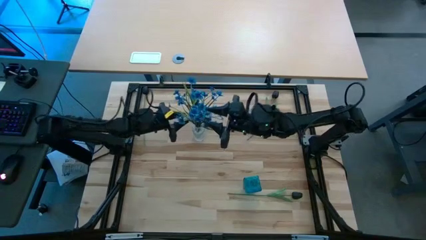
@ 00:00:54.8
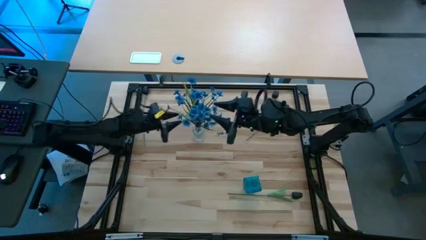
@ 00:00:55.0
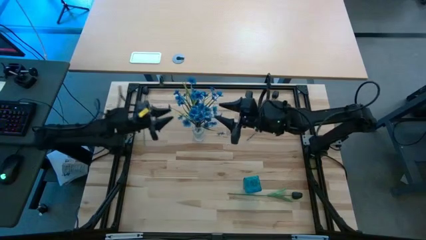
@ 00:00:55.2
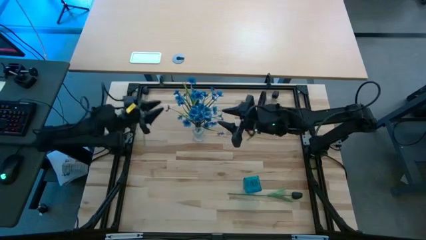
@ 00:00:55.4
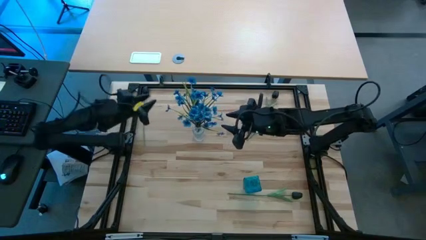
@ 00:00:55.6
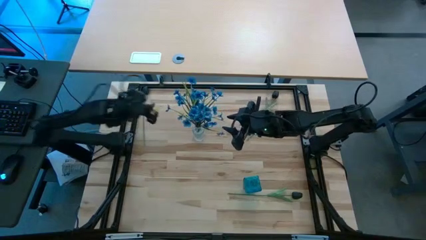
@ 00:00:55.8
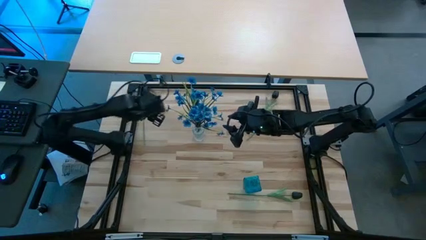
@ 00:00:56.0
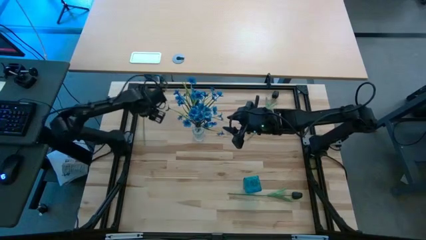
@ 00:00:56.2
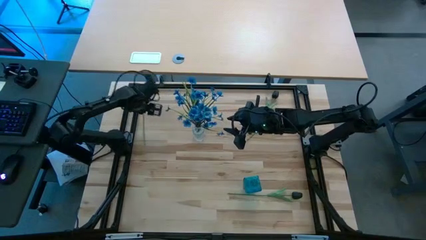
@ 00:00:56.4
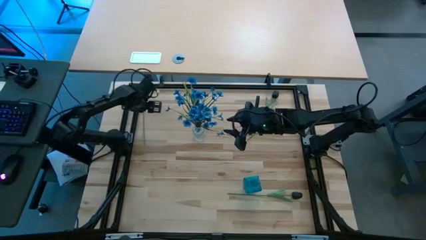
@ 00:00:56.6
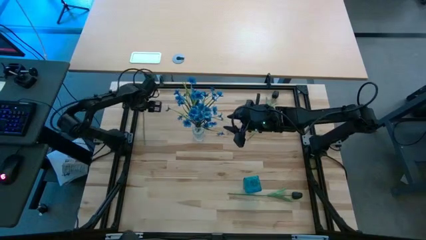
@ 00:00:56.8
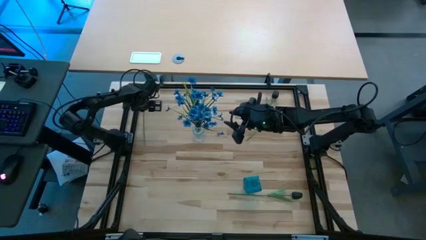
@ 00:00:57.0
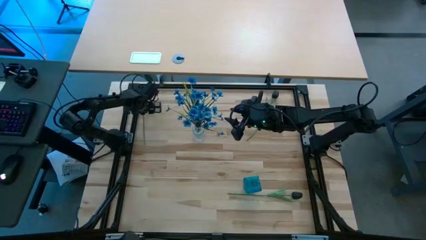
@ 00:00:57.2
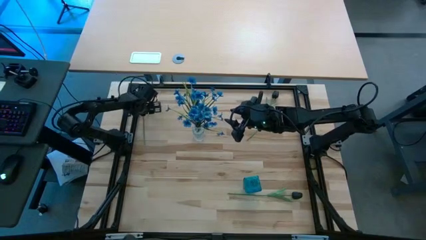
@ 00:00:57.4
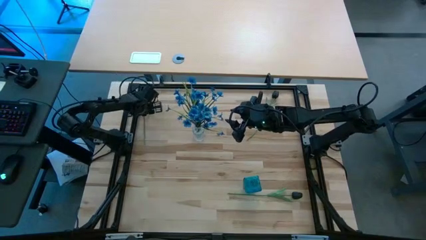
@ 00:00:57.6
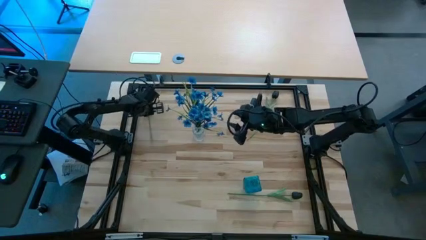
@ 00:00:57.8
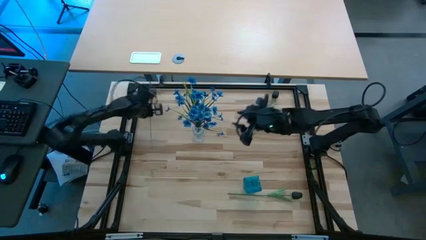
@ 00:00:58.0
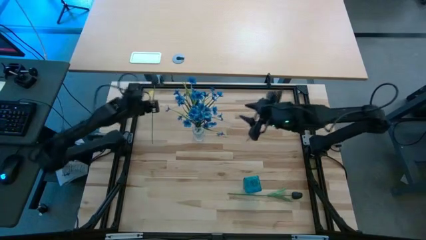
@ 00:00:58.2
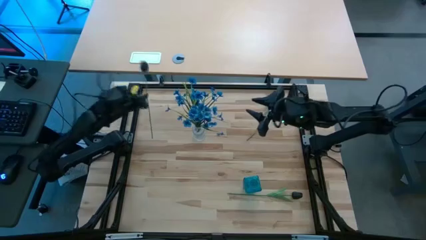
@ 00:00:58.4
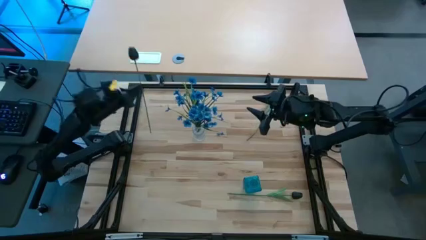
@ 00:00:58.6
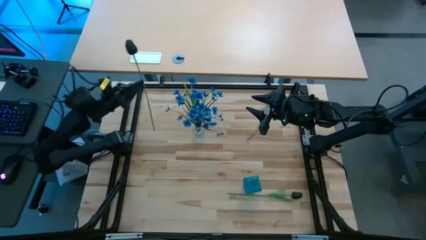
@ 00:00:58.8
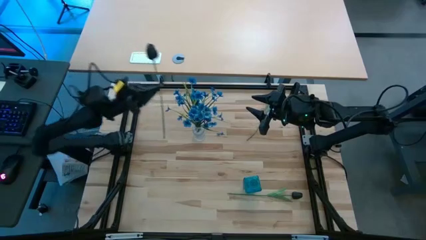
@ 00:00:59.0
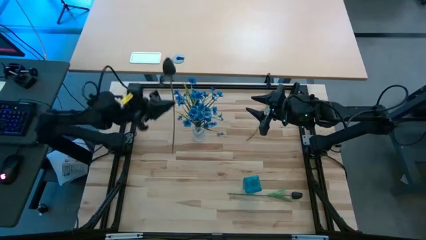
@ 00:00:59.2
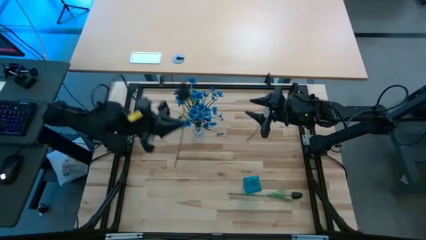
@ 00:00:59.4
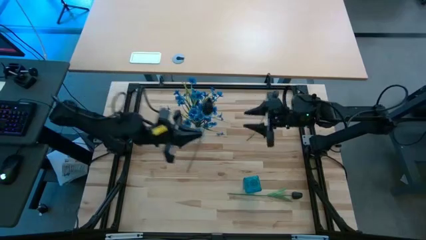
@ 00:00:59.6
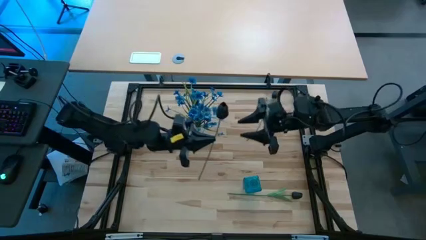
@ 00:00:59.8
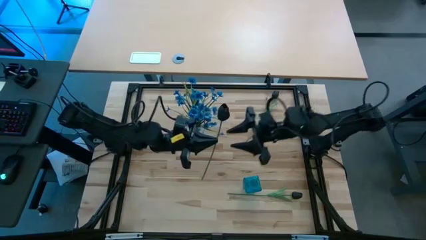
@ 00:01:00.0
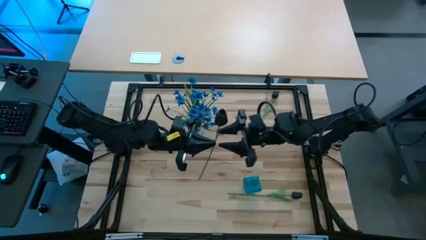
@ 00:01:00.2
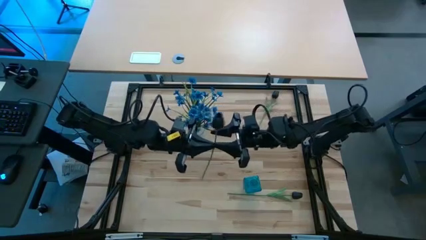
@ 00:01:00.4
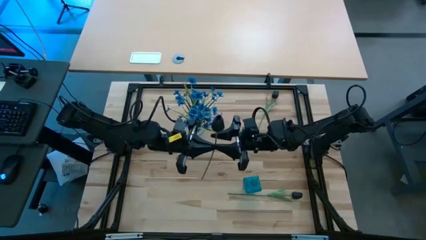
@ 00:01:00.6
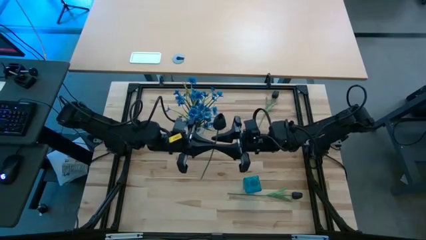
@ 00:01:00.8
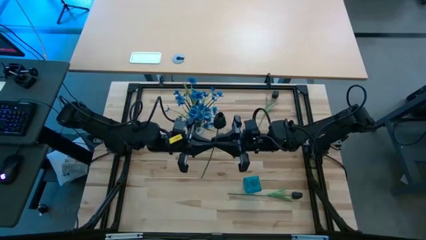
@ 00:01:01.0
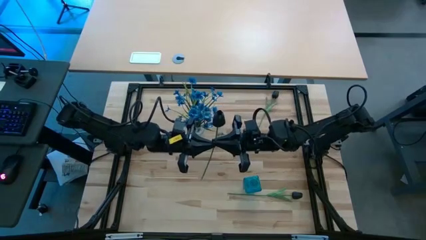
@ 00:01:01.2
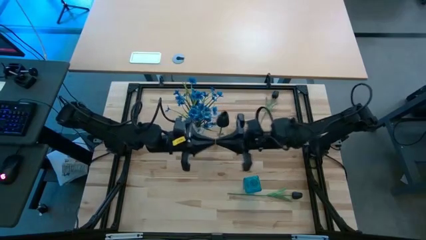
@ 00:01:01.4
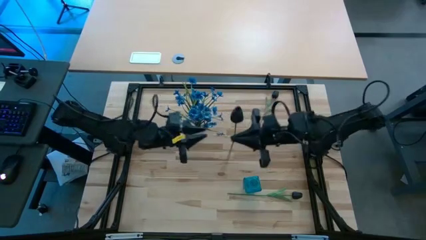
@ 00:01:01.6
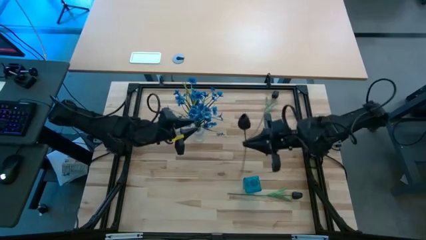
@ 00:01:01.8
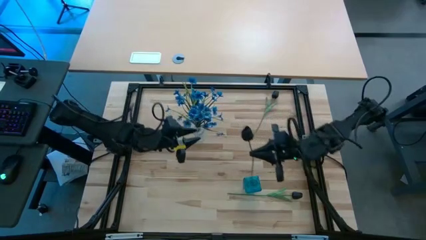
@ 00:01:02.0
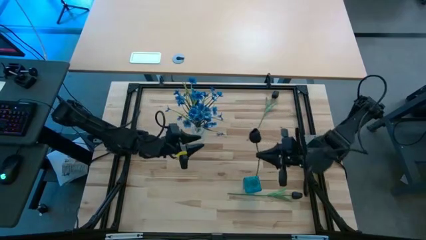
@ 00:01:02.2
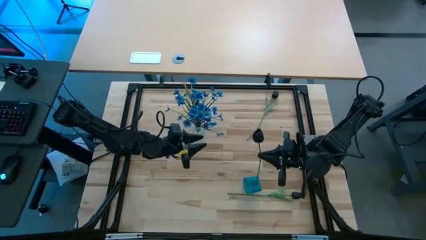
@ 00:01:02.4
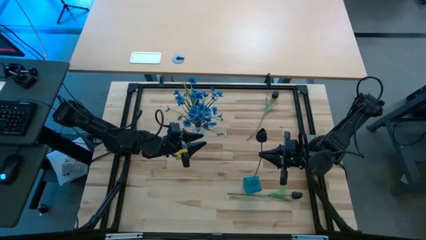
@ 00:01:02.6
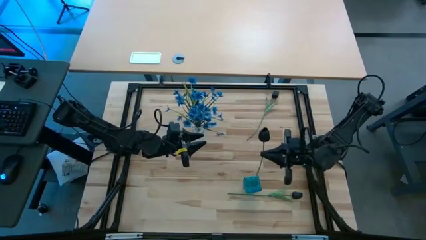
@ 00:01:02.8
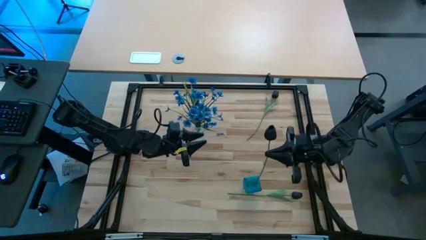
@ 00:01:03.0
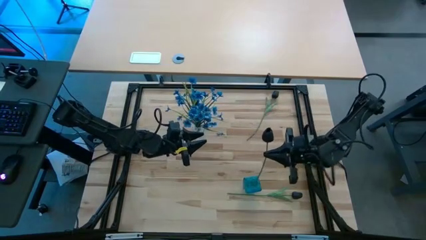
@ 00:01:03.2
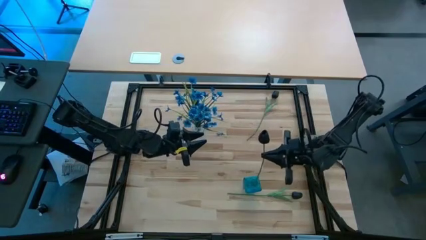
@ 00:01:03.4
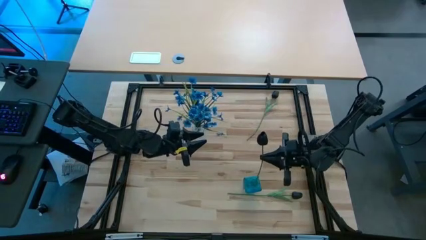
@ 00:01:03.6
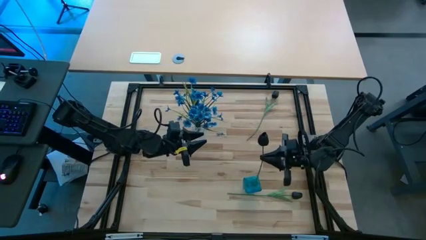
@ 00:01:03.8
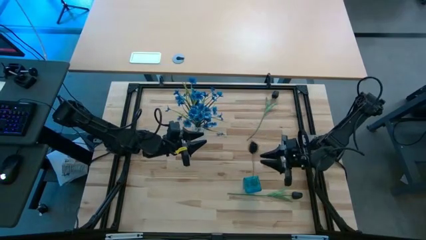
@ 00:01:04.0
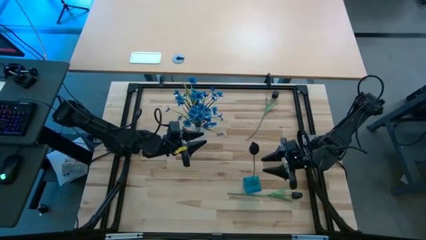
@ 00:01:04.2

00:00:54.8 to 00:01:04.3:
Task: Sort flowers into vase by color
Put the top left dark blue flower into the blue vase

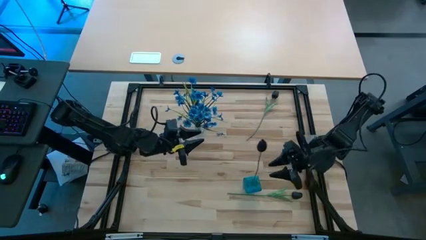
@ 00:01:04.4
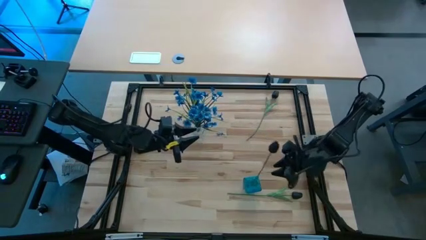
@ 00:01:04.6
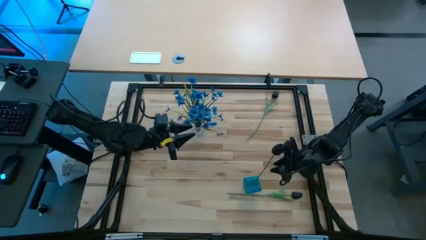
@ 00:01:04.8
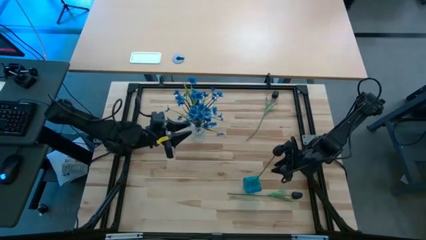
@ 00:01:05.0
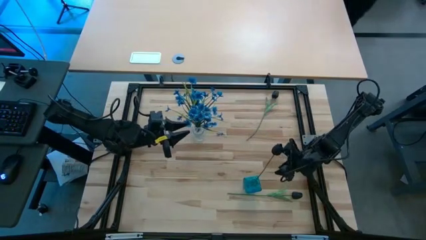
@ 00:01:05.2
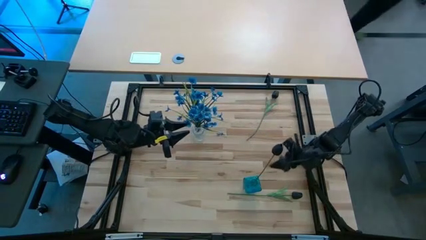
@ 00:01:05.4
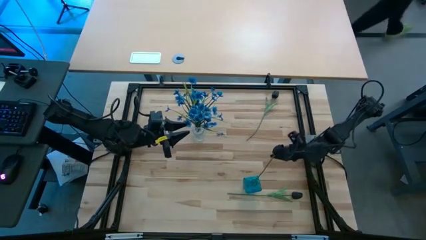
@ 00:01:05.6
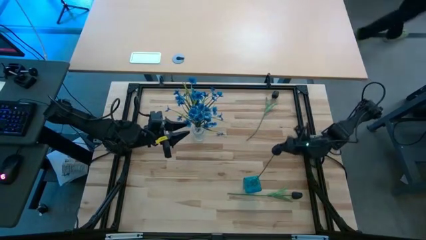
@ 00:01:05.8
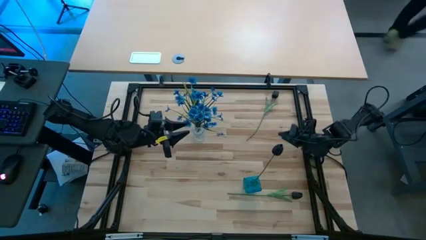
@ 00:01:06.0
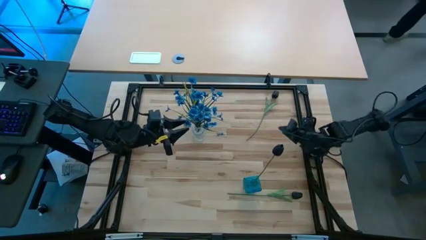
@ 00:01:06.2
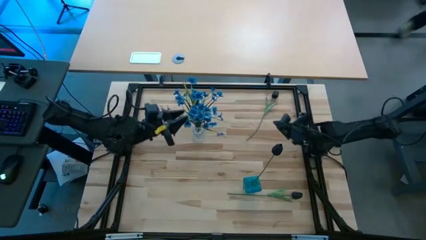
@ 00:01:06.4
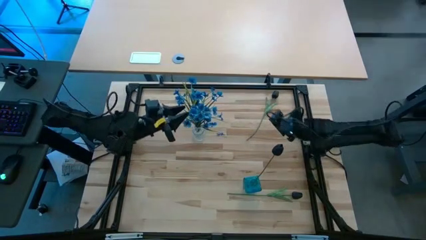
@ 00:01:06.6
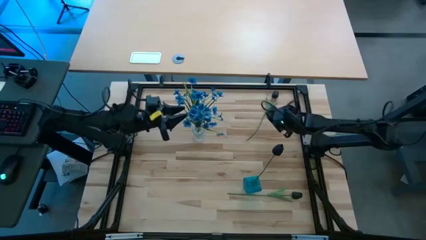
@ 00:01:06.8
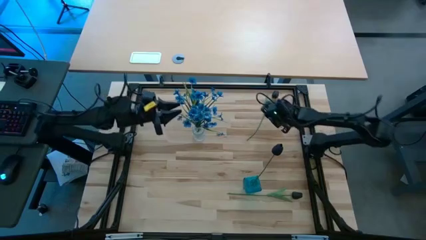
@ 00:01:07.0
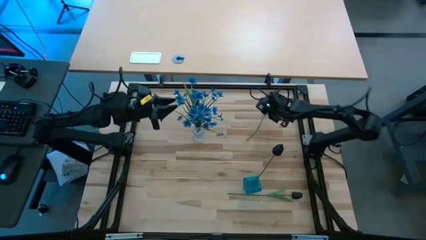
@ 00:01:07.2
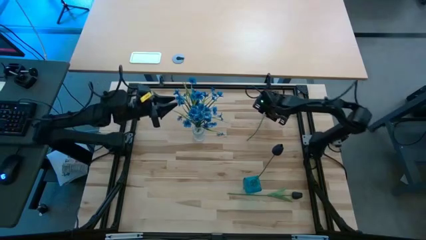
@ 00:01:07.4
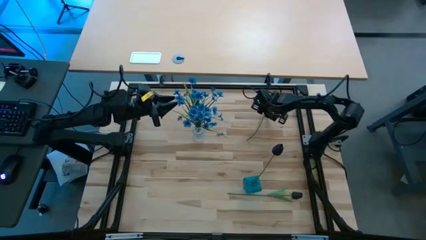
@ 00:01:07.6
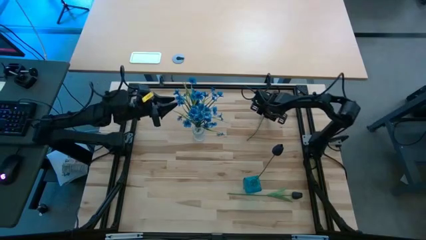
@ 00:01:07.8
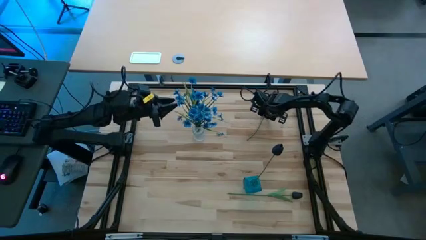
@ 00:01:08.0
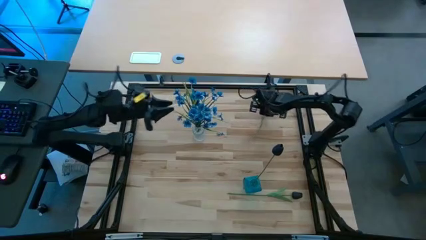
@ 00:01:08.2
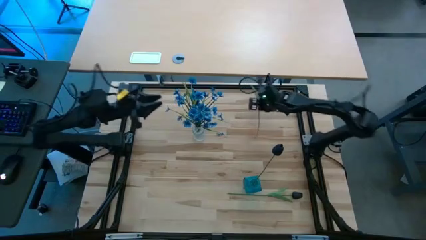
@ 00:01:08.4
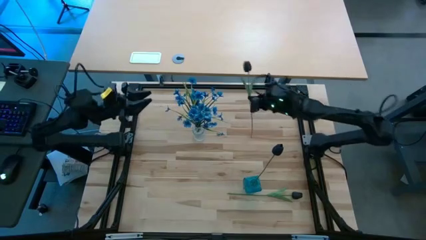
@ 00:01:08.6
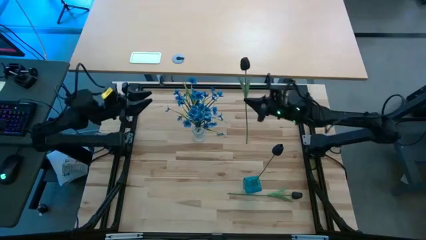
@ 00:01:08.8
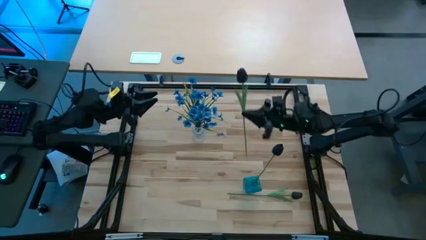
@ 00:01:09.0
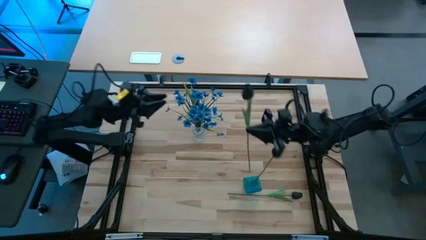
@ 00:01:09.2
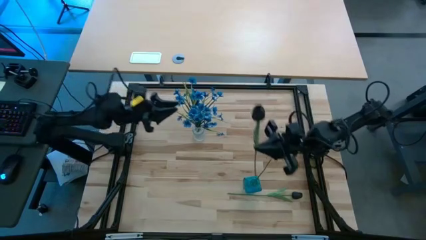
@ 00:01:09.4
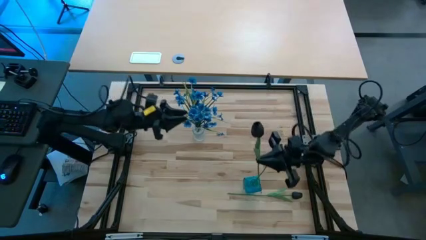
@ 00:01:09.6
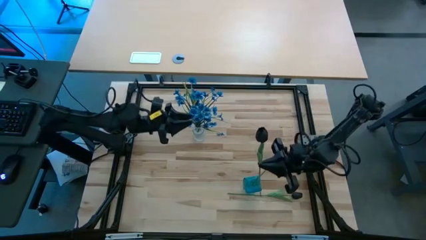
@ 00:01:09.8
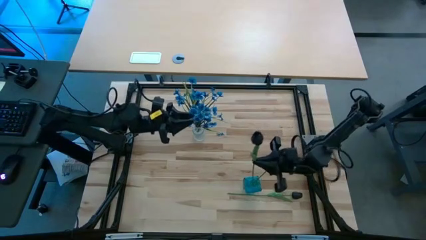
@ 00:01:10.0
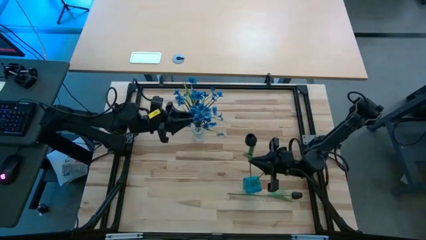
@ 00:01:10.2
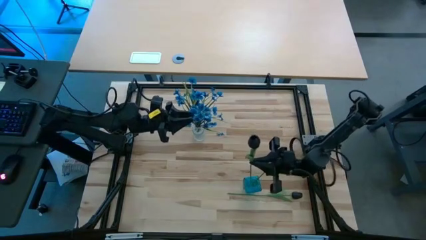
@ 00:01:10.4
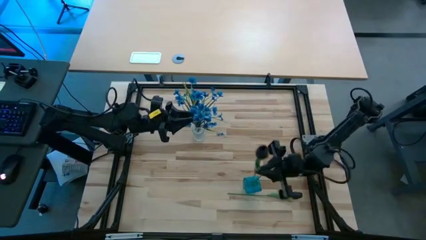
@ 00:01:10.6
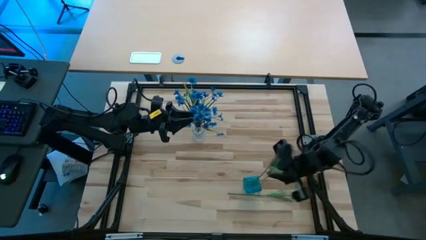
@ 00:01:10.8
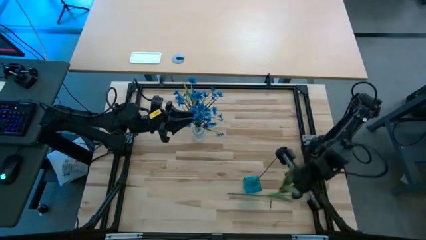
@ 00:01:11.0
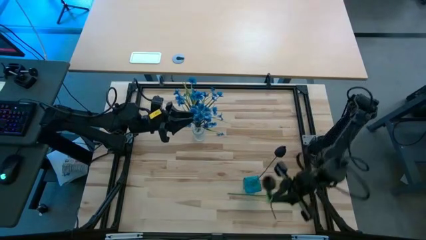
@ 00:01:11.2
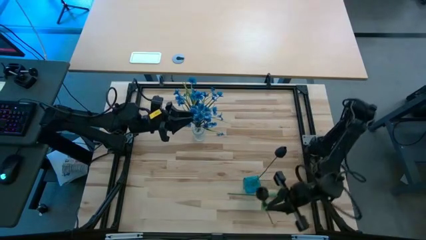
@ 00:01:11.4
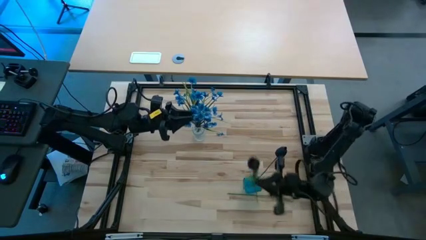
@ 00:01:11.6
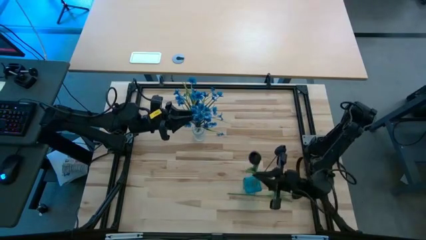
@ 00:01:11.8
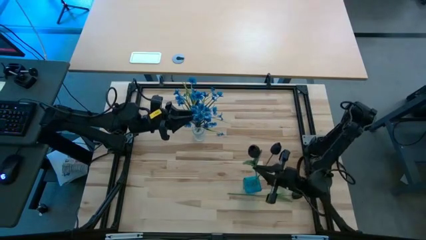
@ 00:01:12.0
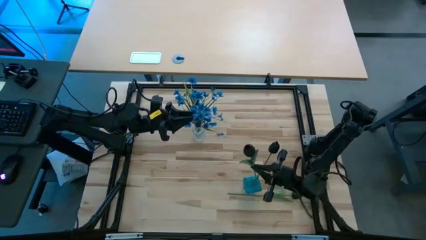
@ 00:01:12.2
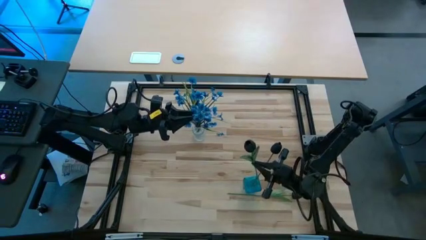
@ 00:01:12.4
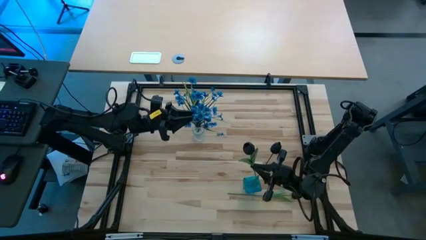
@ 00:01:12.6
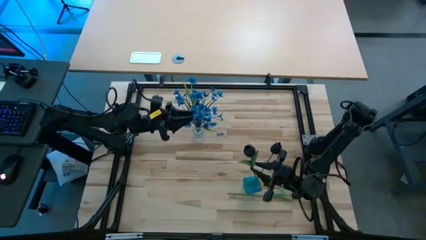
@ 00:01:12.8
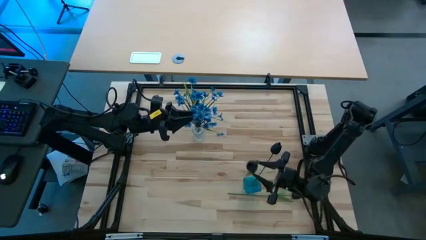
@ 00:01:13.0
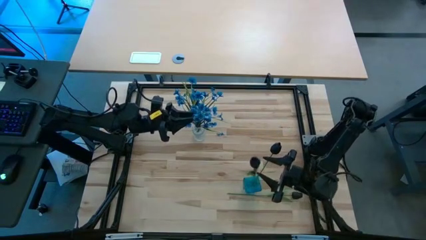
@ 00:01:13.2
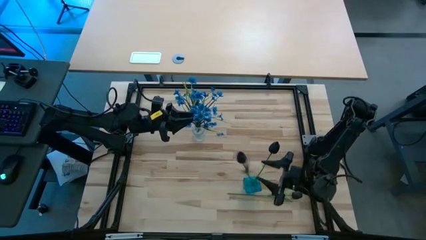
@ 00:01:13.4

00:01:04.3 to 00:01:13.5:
Put the top dark blue flower into the blue vase
